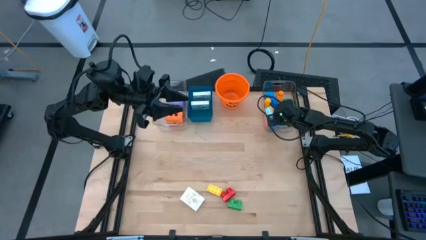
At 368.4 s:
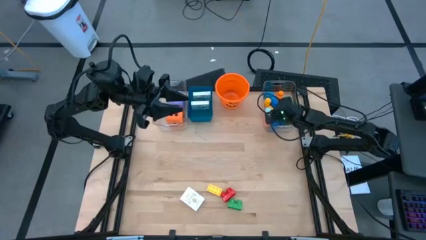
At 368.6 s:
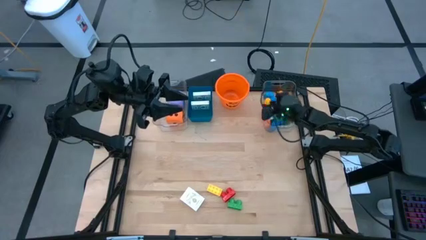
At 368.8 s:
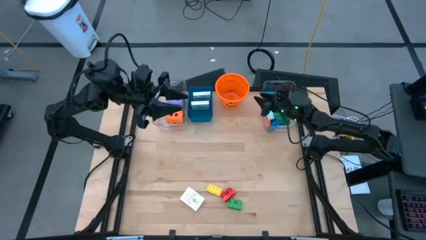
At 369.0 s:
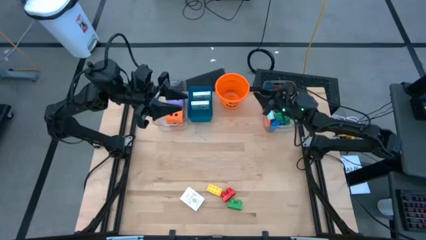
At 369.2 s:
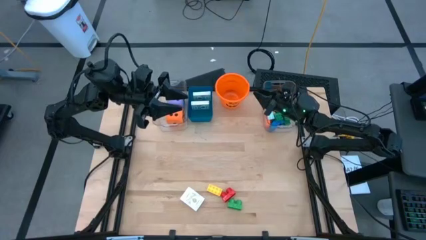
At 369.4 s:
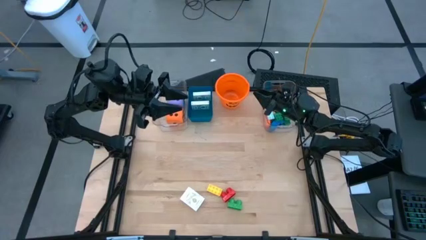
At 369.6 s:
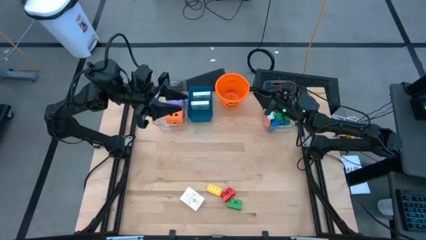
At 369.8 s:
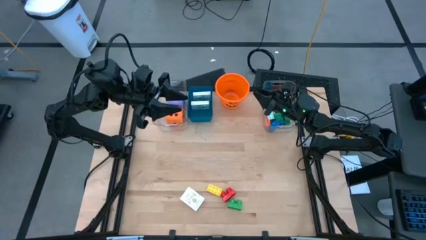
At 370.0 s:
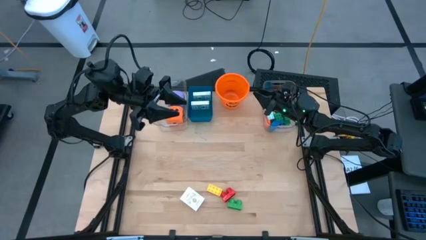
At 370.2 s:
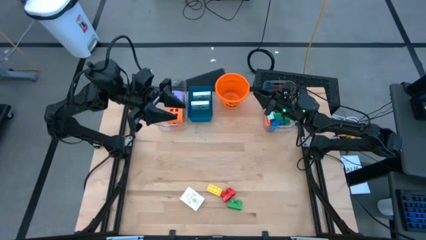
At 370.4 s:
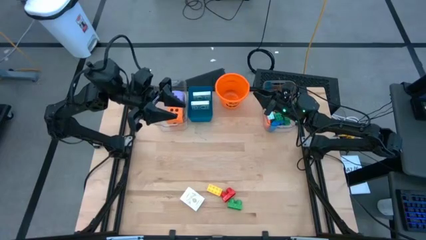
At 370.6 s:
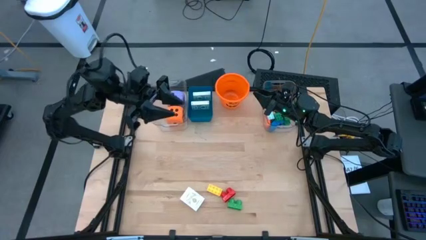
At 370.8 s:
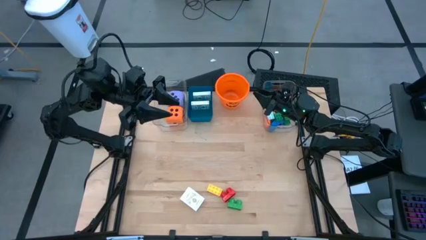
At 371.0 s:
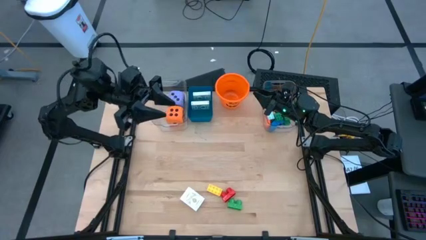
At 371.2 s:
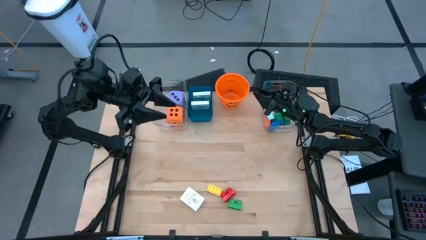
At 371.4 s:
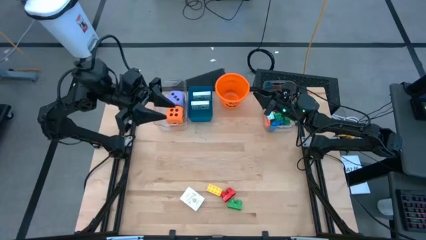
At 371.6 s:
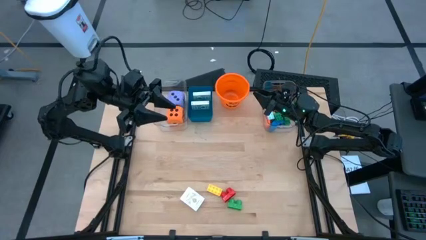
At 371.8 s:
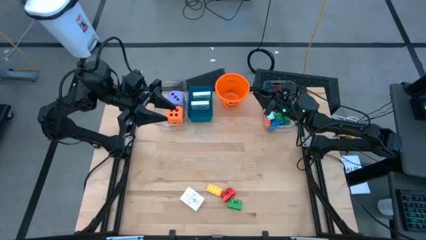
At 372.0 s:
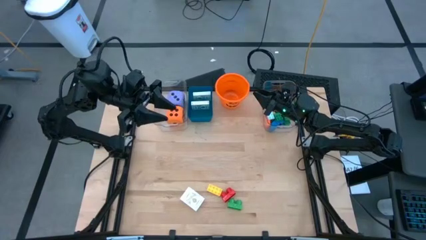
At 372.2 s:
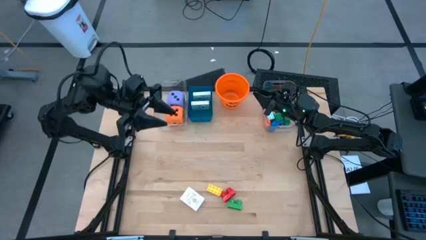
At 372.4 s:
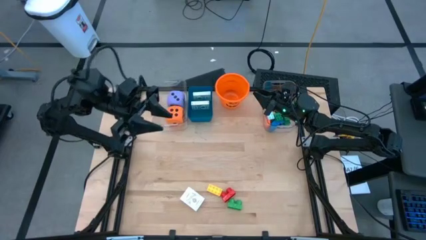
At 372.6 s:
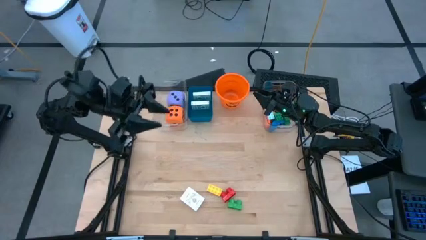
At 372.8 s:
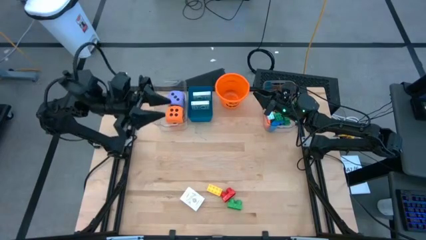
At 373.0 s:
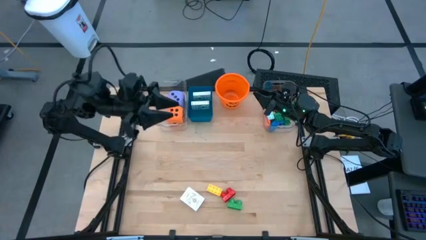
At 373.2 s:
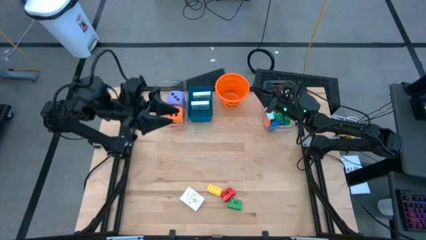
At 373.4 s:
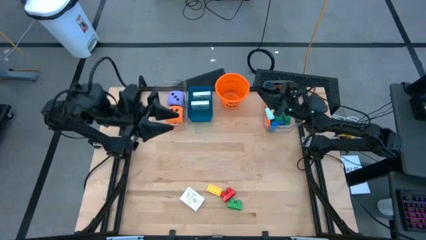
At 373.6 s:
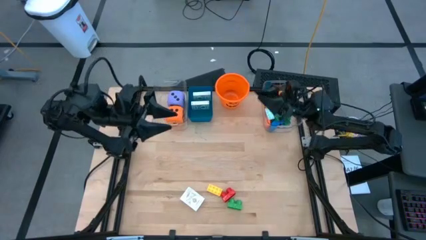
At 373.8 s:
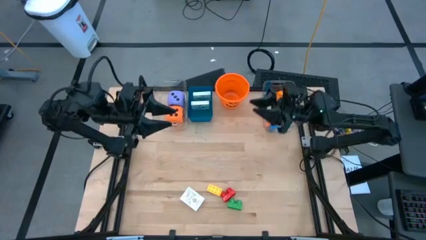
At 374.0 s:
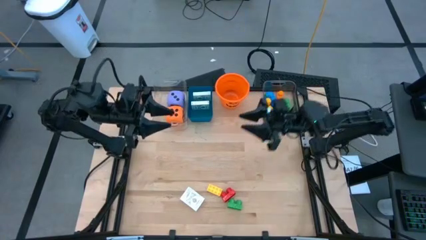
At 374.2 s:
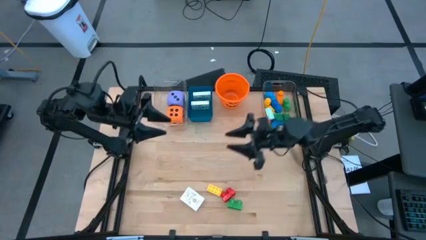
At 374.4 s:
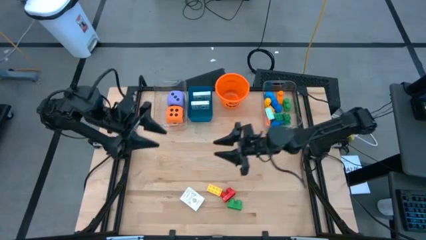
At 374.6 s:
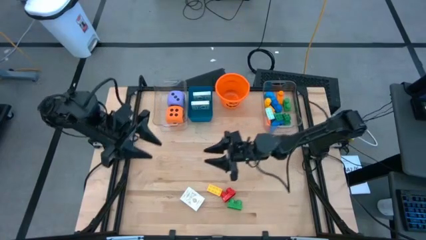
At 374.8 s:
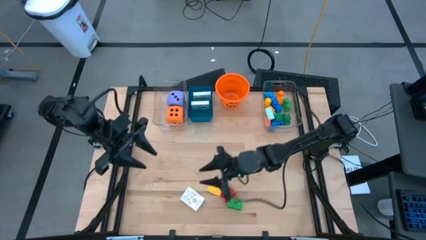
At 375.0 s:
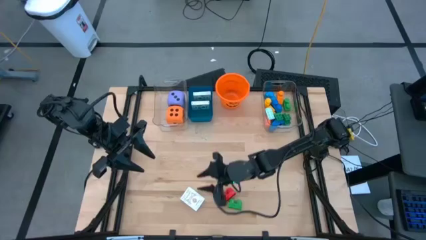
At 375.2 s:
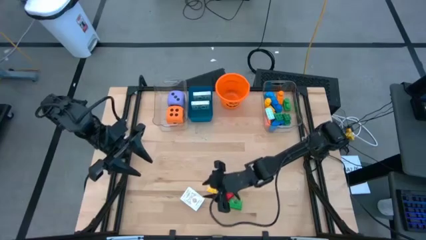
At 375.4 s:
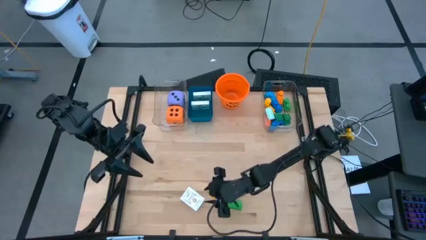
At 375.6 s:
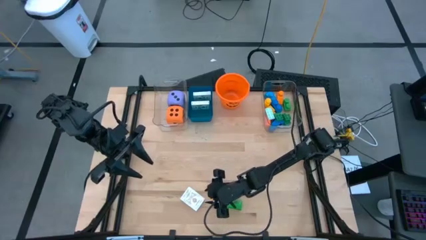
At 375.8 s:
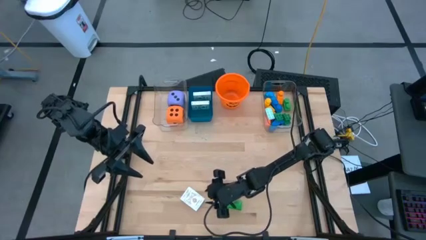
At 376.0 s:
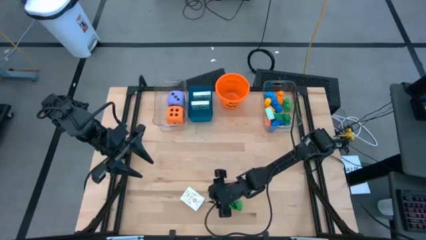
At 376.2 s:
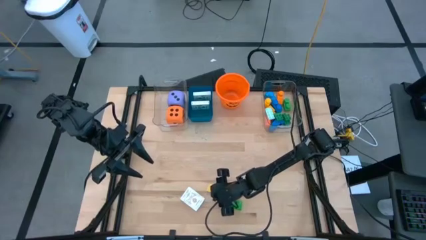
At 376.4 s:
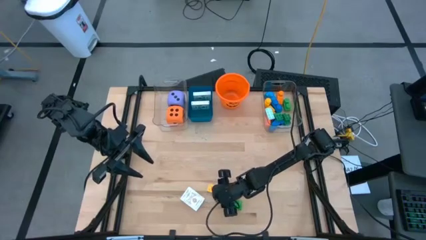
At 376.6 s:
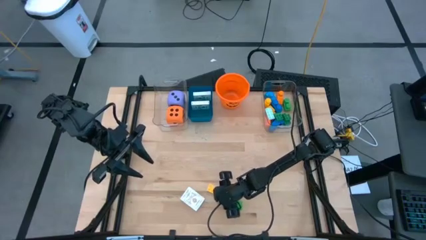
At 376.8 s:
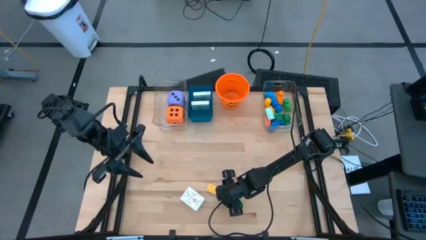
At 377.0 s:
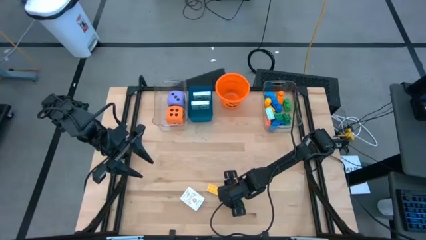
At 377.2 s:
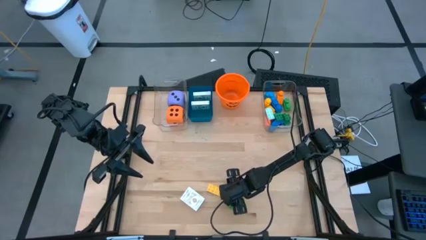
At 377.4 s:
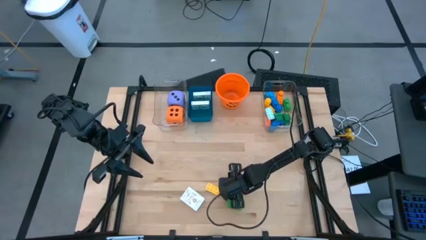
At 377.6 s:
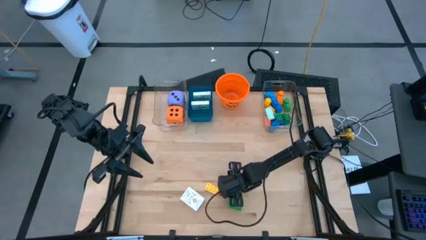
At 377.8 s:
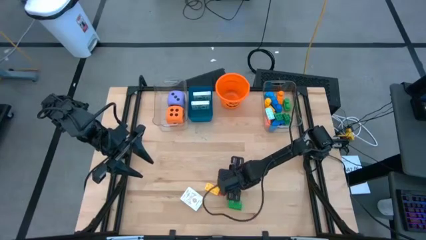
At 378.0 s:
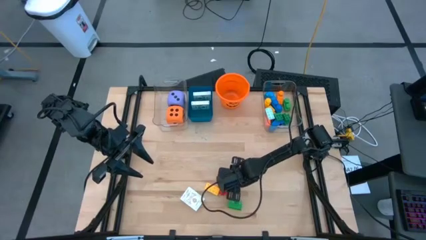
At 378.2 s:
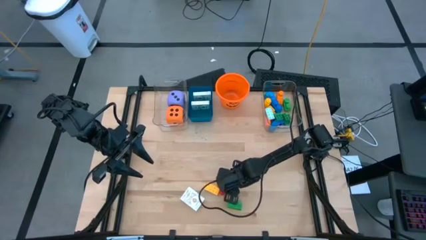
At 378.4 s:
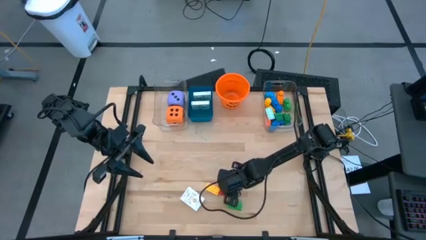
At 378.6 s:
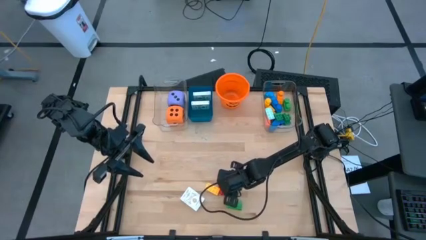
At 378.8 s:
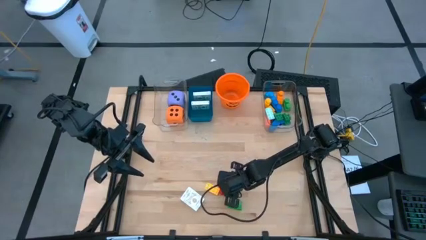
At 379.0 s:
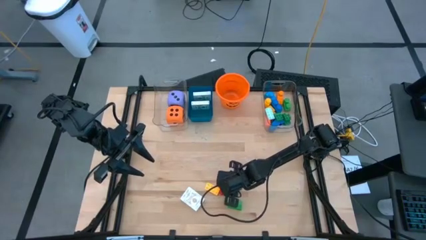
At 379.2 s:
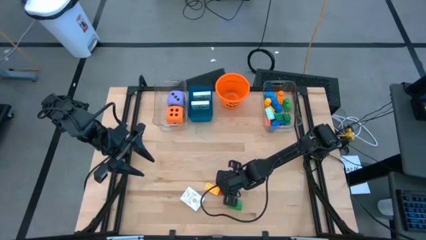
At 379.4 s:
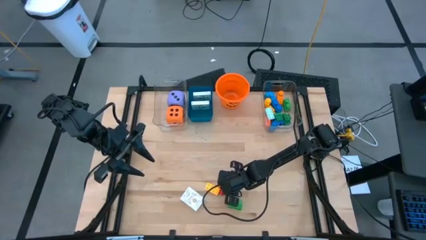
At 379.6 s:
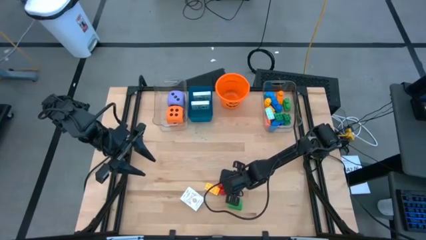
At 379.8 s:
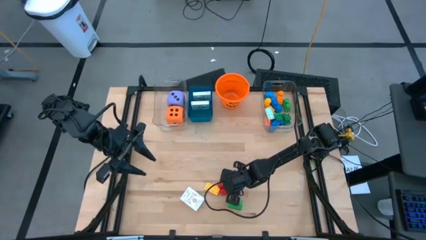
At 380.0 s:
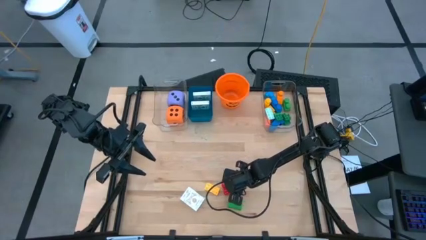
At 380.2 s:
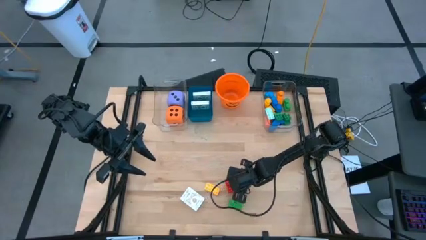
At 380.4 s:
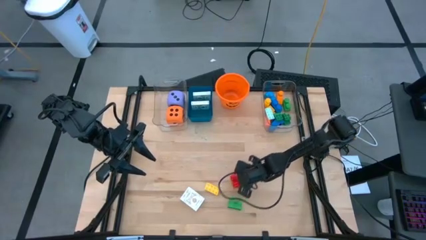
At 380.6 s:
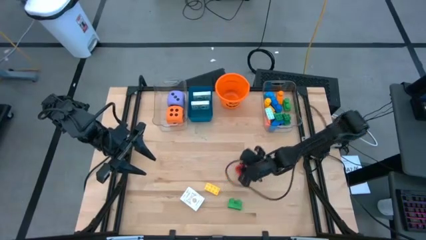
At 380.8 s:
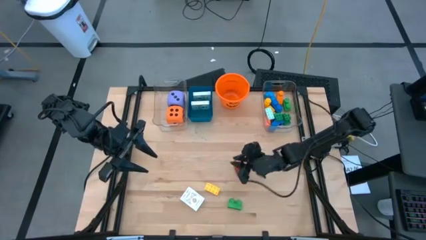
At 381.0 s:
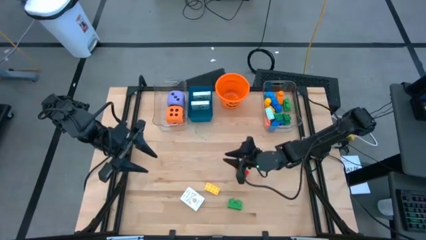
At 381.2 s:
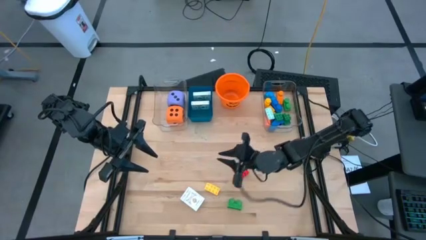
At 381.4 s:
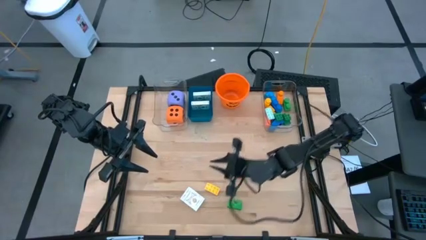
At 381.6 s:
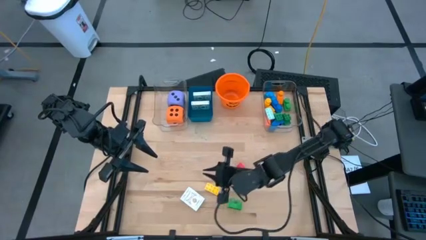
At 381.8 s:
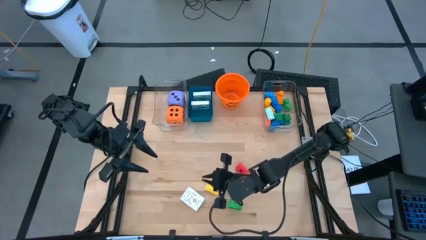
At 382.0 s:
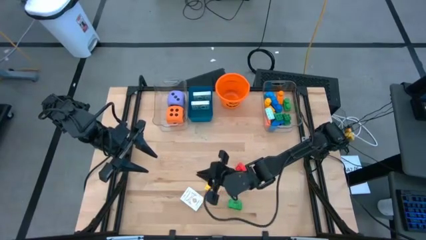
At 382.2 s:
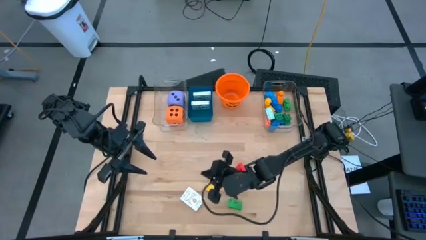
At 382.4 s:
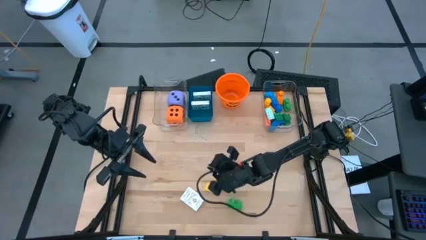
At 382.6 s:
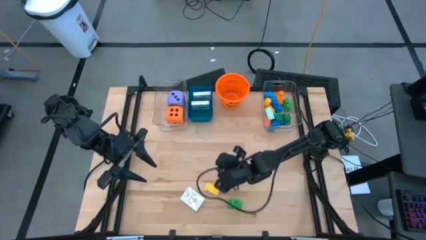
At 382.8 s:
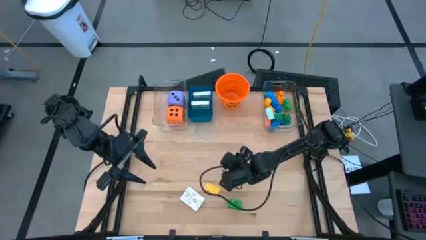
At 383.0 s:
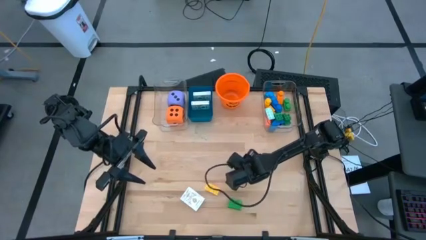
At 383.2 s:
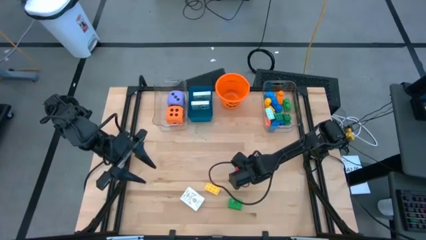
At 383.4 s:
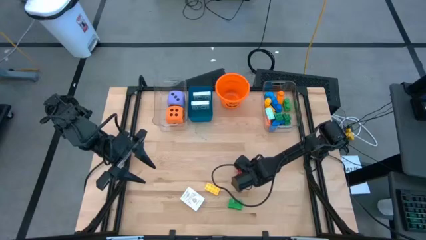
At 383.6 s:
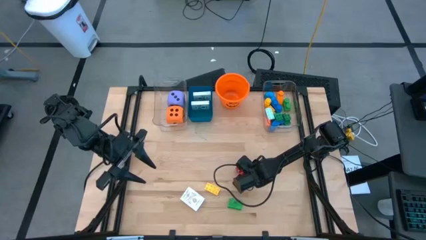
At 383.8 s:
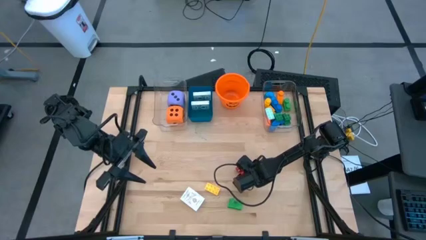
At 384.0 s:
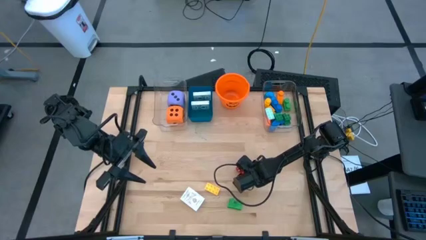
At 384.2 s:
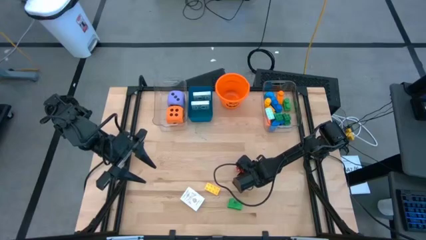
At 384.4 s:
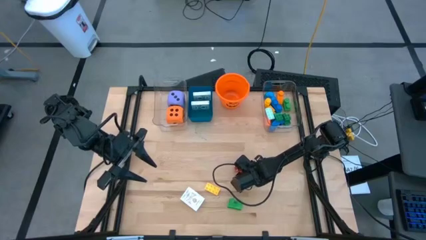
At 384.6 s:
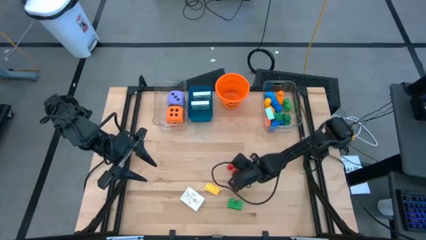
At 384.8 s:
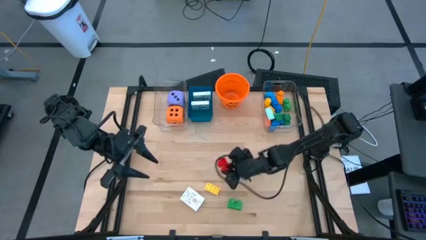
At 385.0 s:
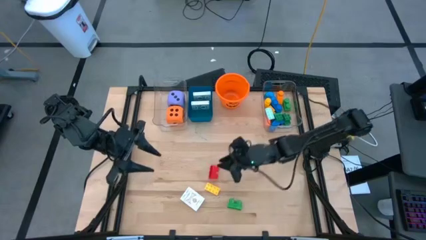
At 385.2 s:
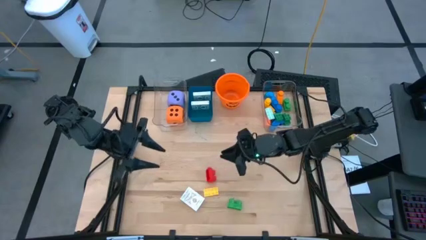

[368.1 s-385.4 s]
Task: Pick & Place Toys
Put the red game piece into the right transparent bin
